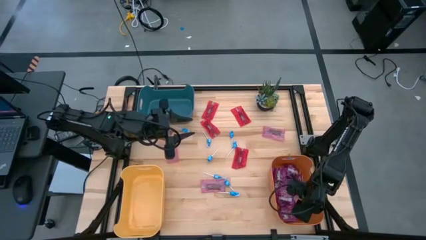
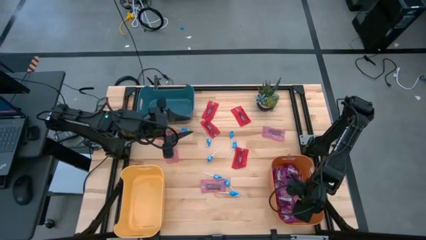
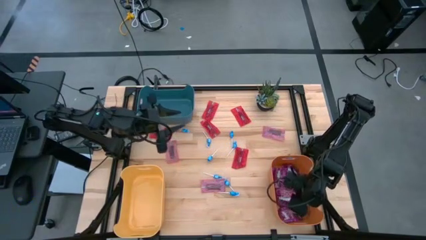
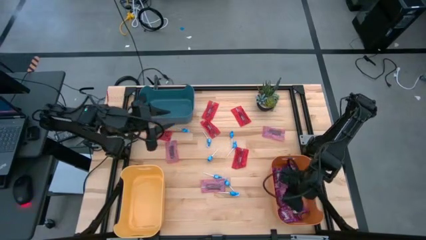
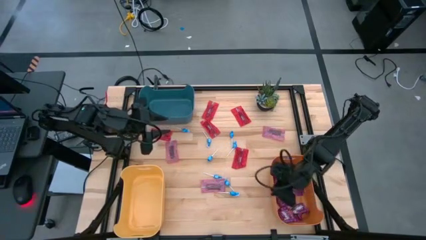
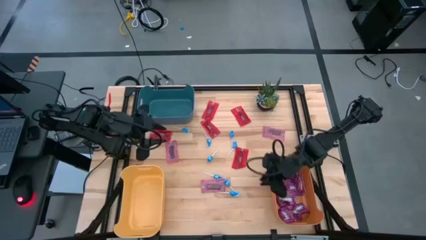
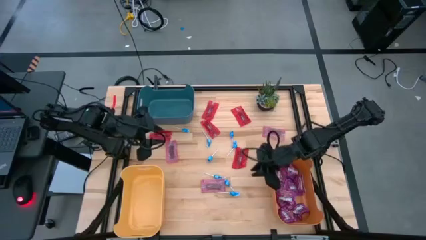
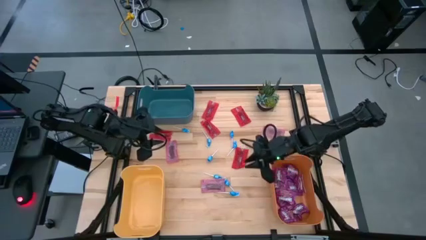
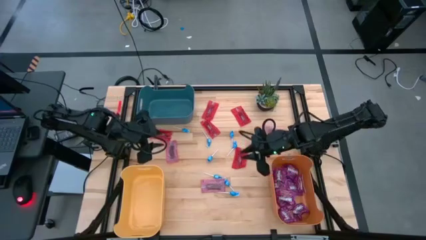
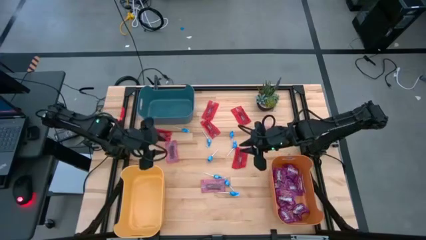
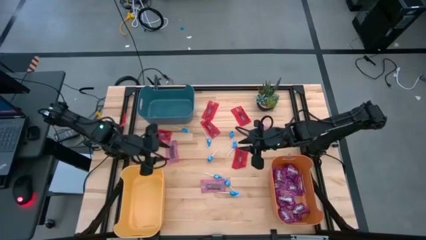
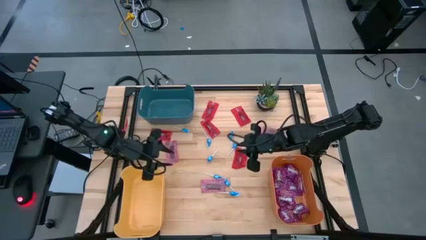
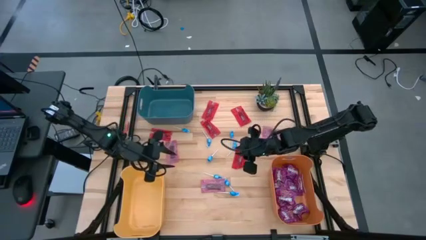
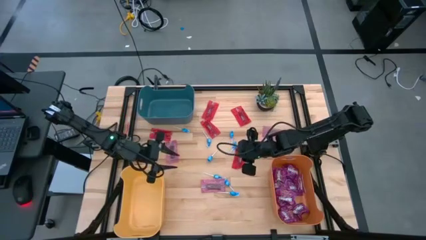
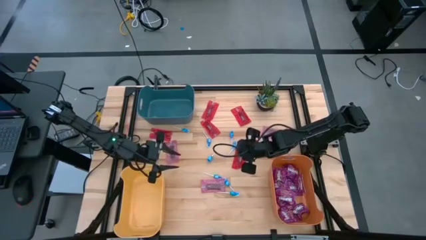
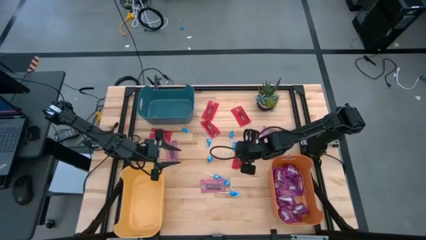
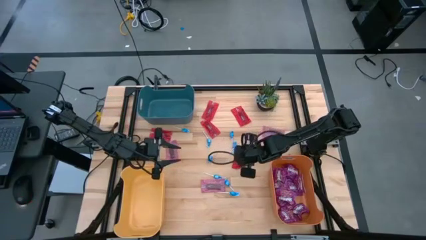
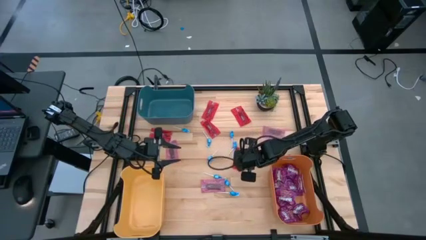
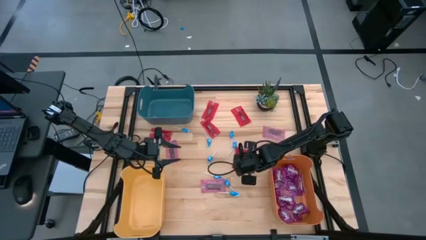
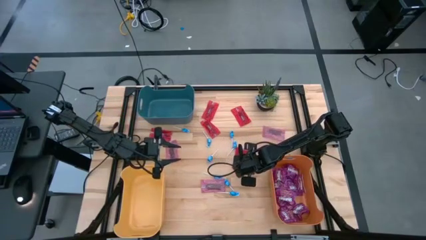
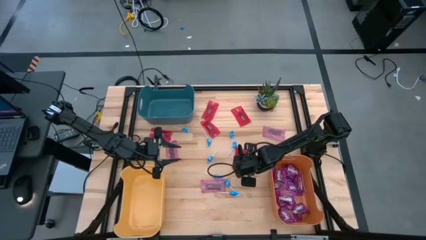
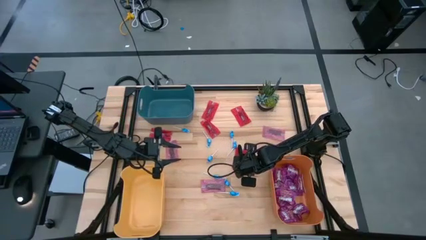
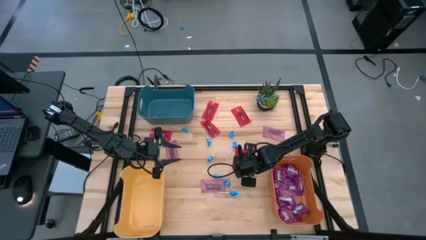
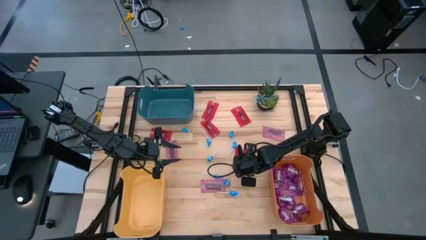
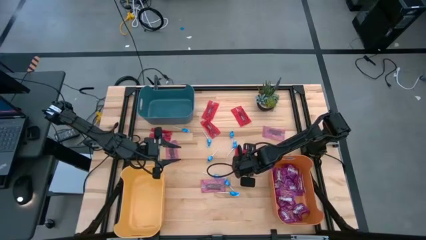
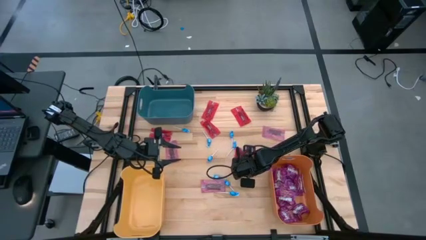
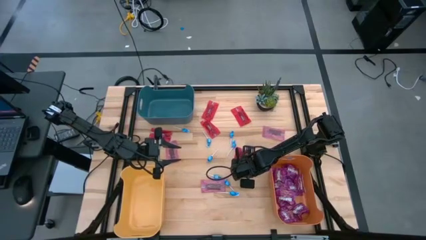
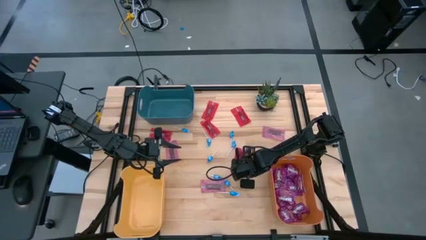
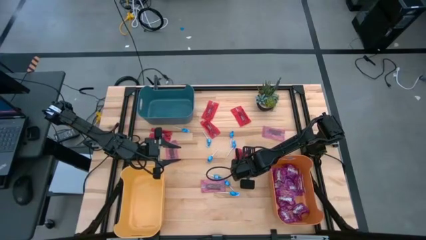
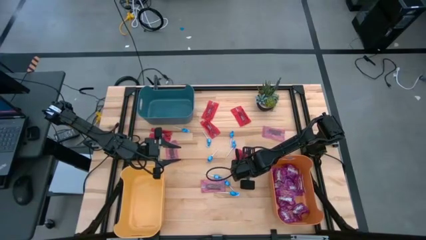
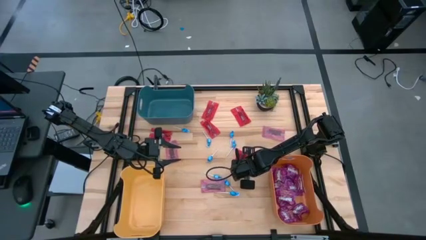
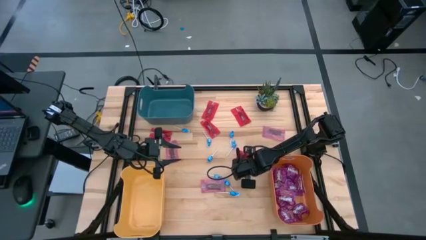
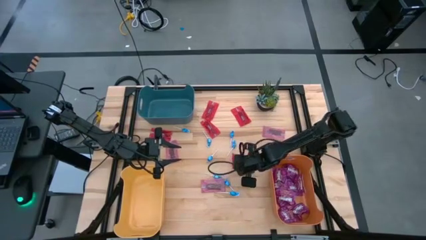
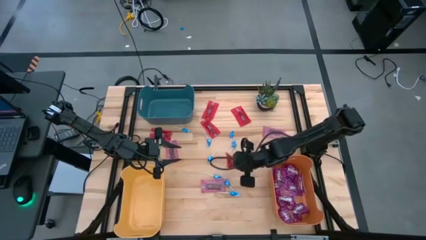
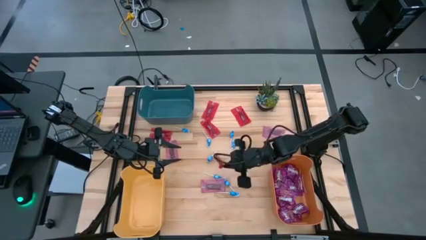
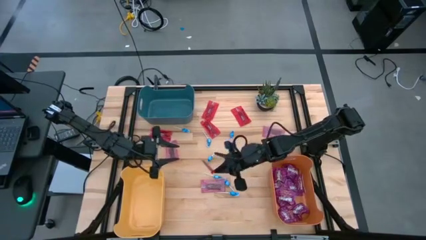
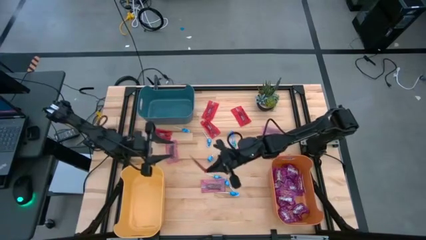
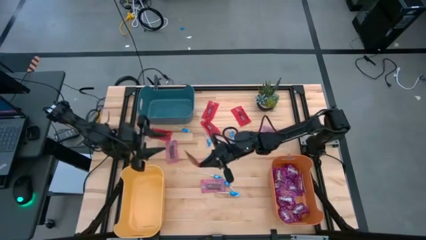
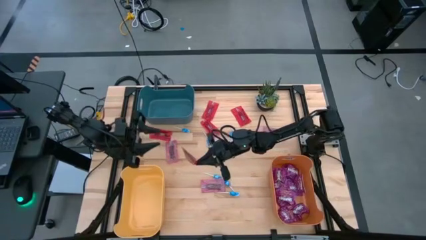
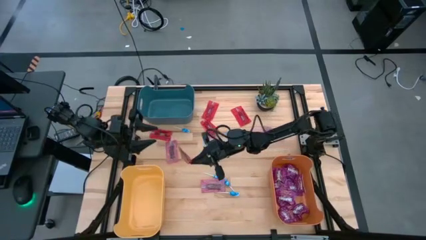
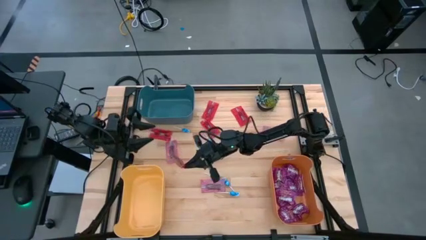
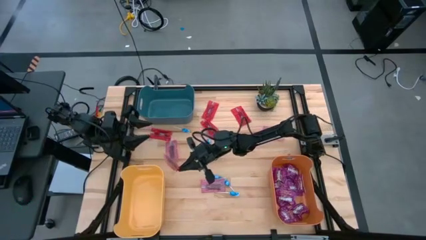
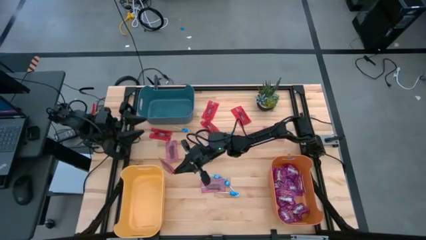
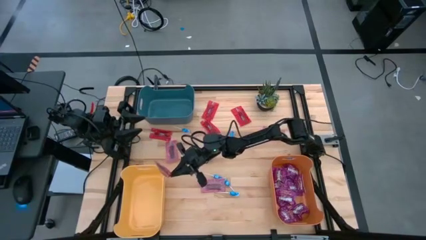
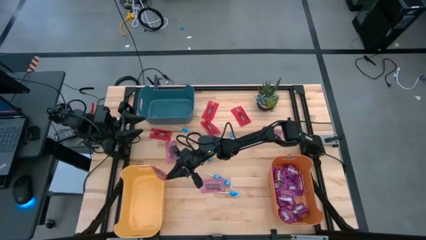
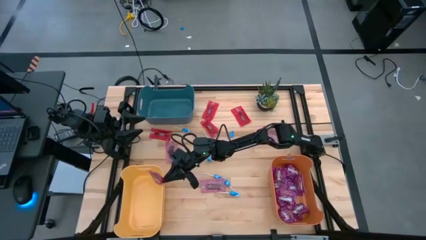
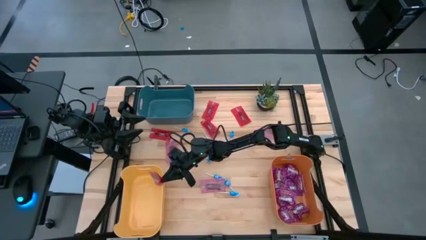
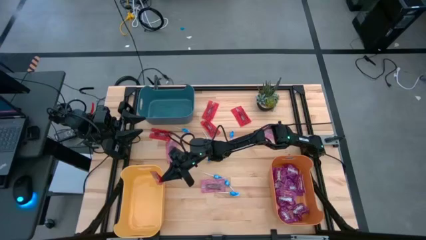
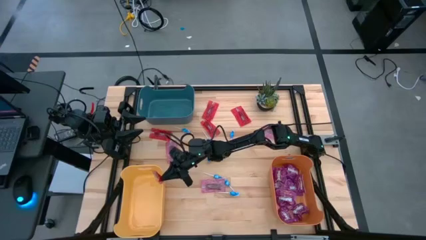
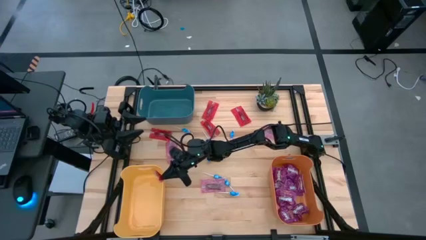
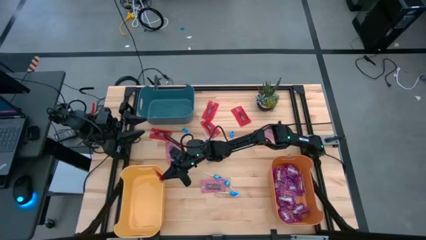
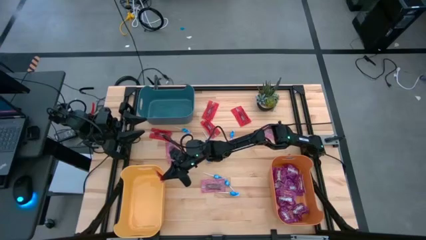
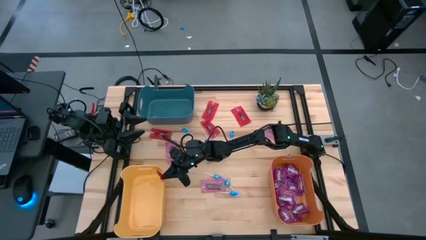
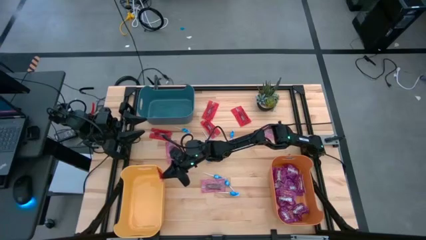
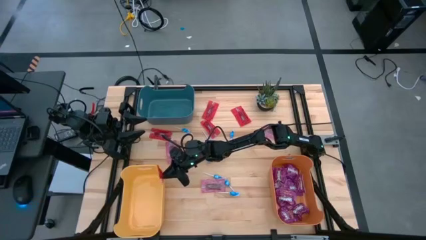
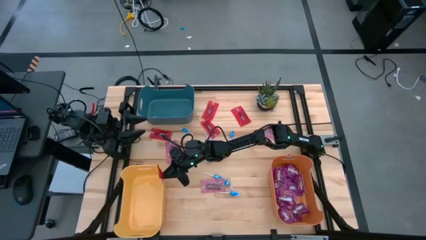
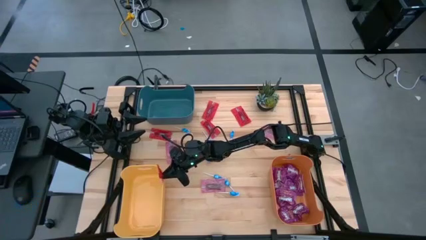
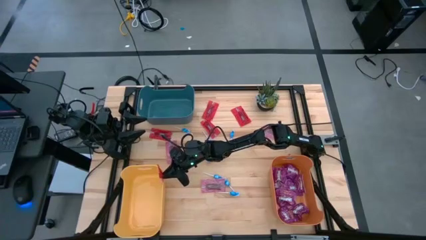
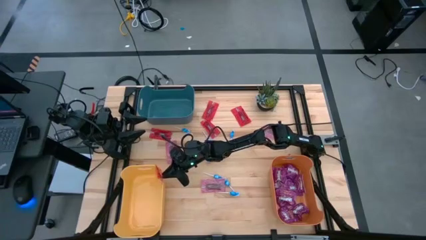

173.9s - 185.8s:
Task: Sort candy
Put the red candy into the yellow bin

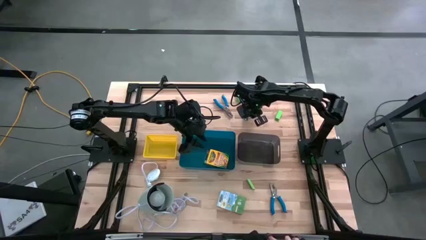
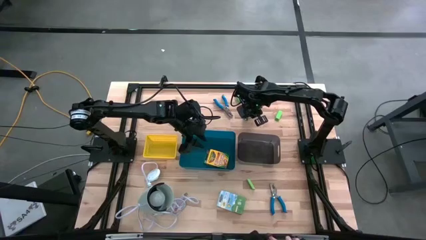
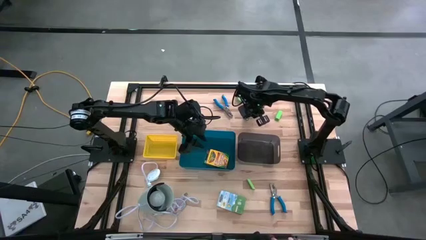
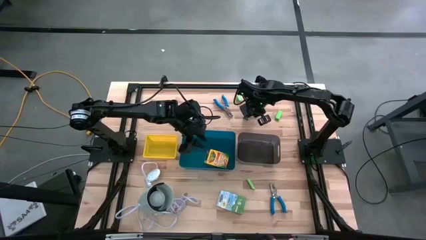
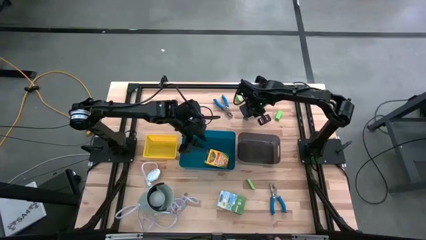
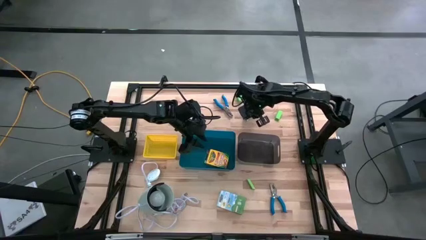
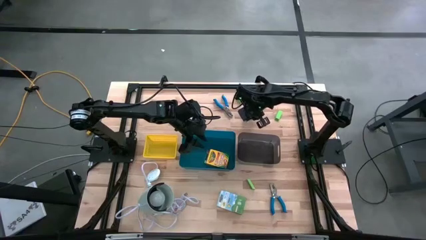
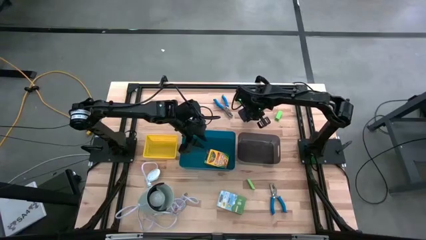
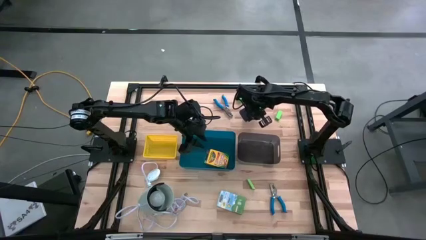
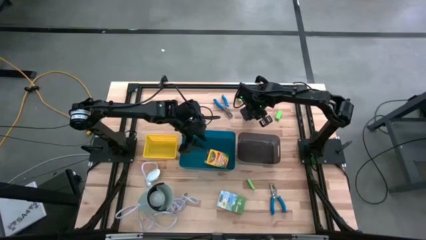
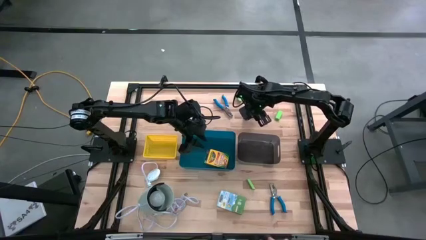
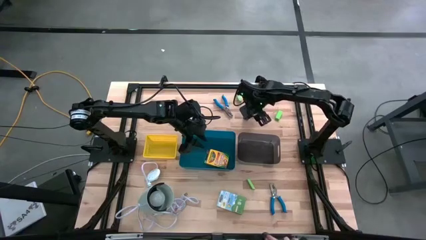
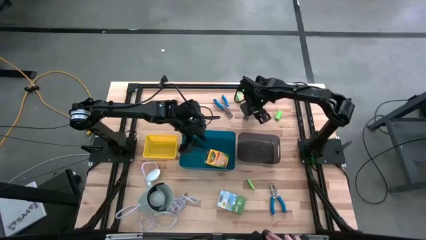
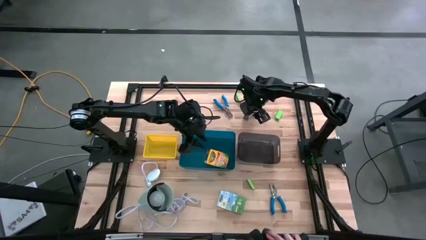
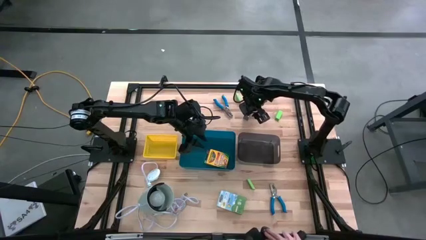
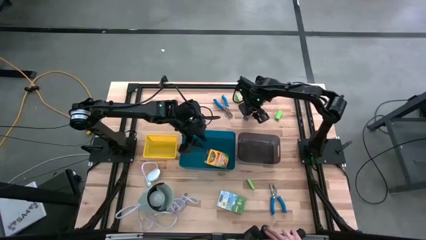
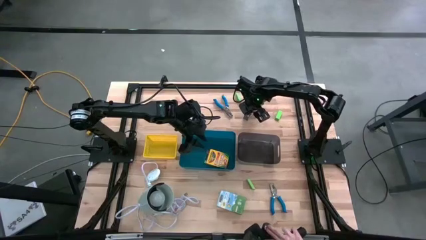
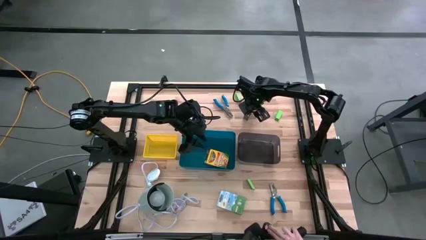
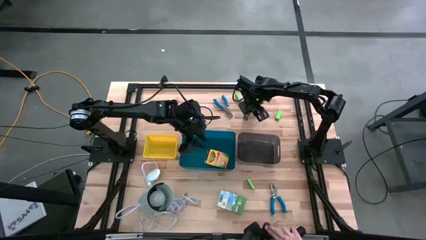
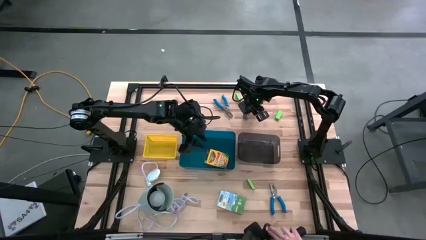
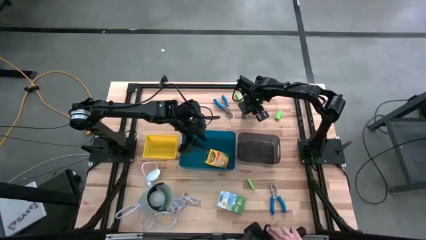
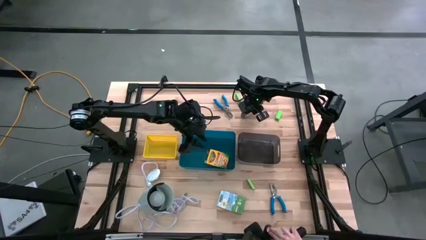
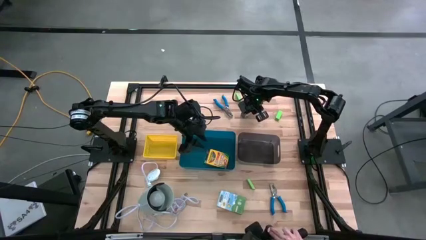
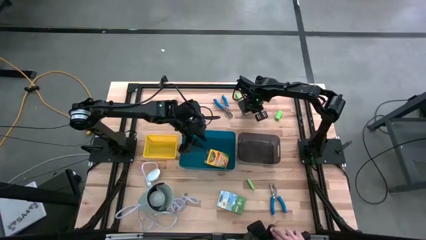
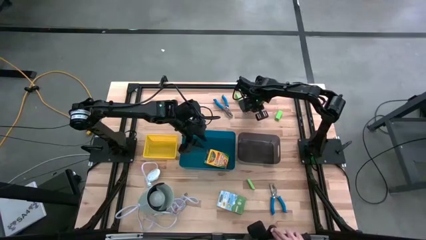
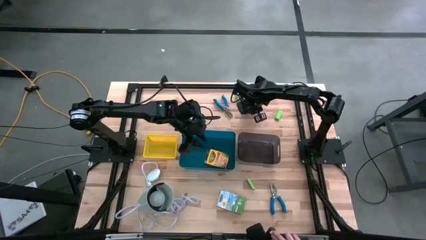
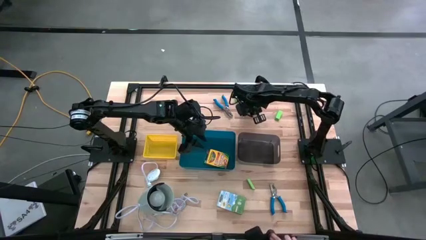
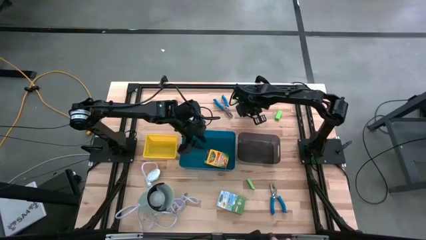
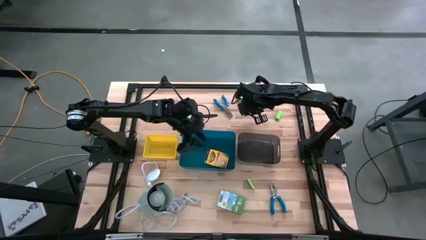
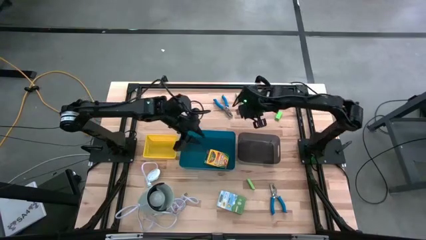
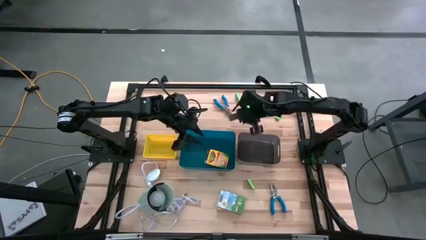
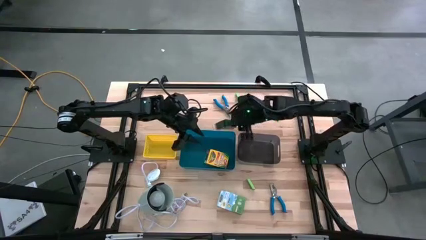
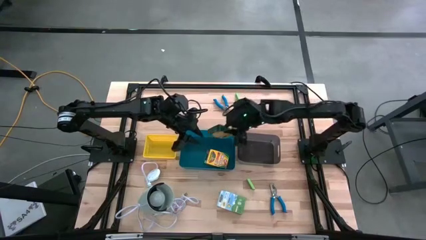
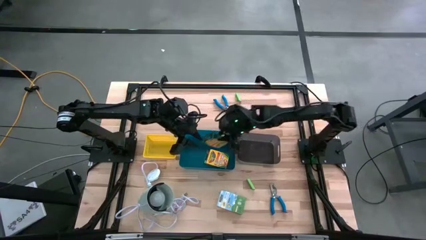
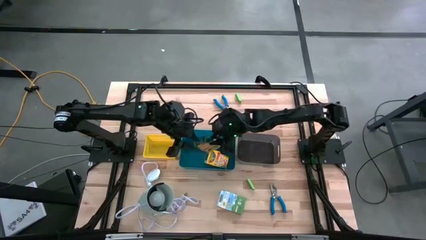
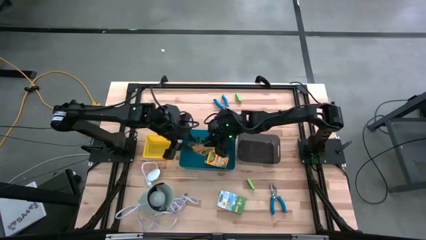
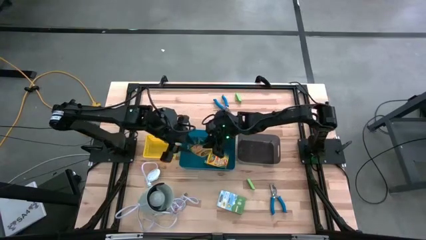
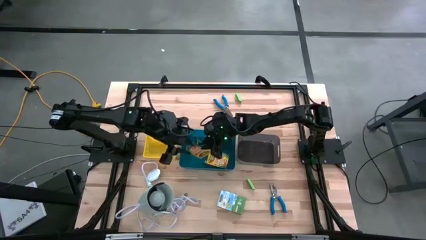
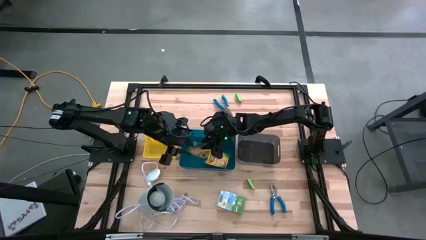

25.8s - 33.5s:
Task: Pick & Place School Supplies
Put the yellow box of crayons into the blue bin
